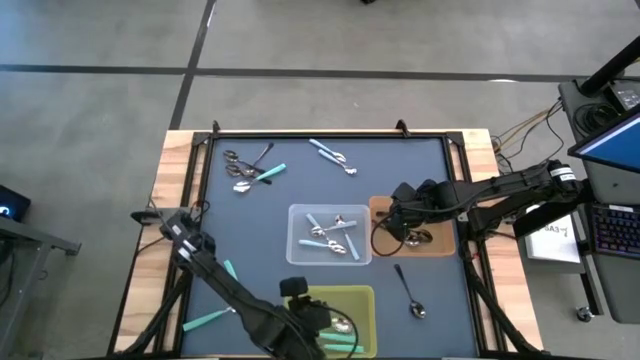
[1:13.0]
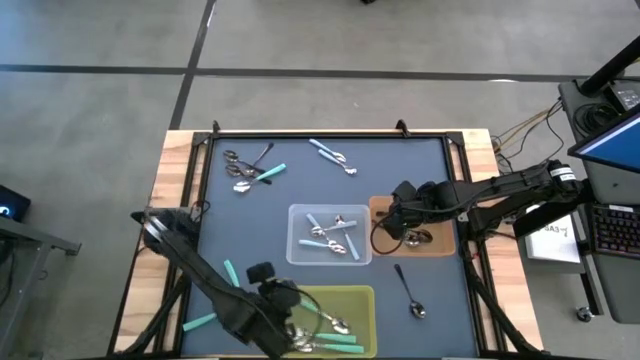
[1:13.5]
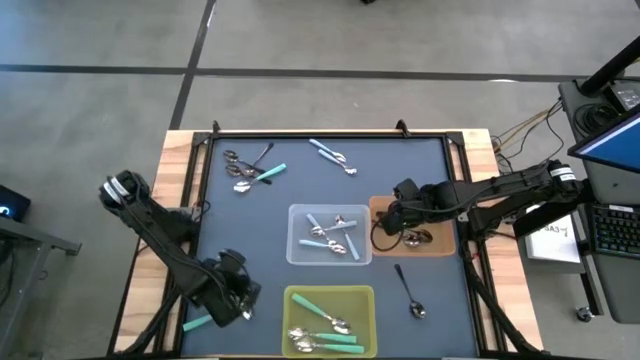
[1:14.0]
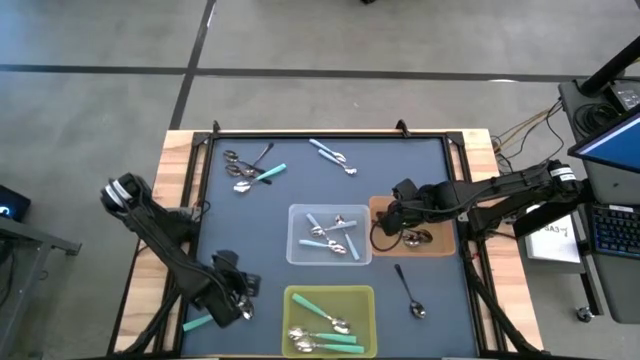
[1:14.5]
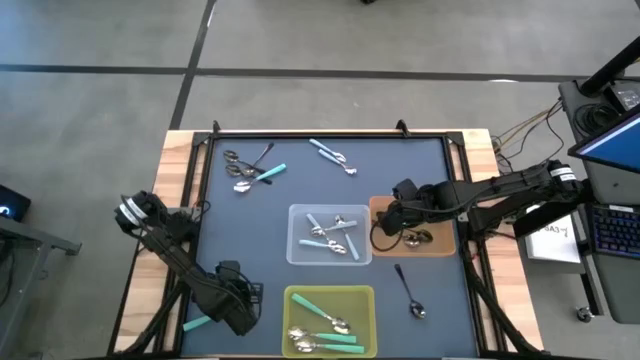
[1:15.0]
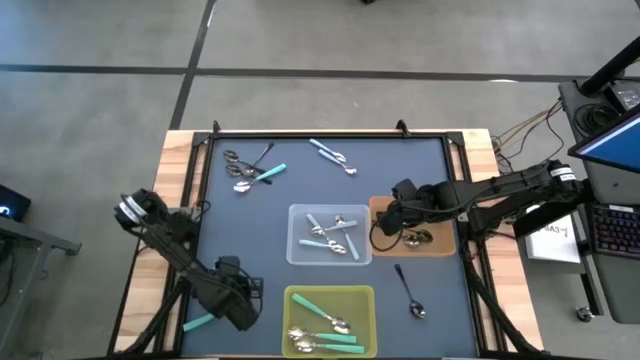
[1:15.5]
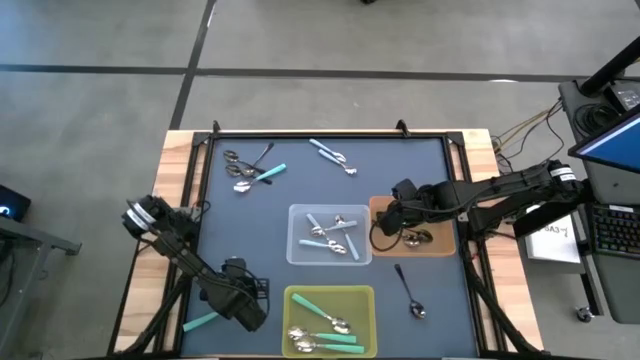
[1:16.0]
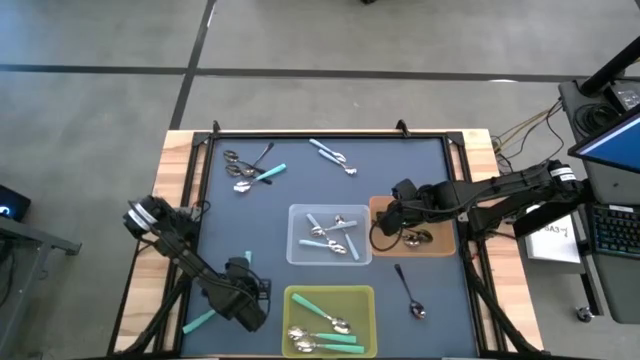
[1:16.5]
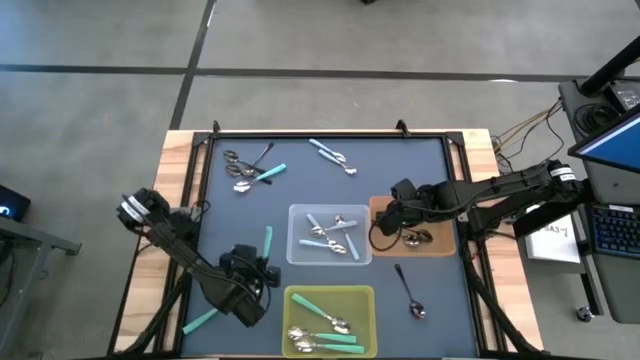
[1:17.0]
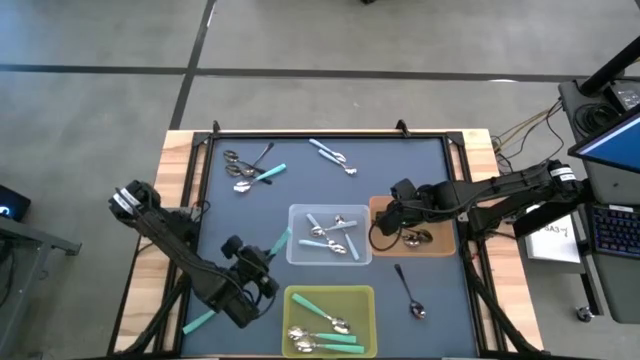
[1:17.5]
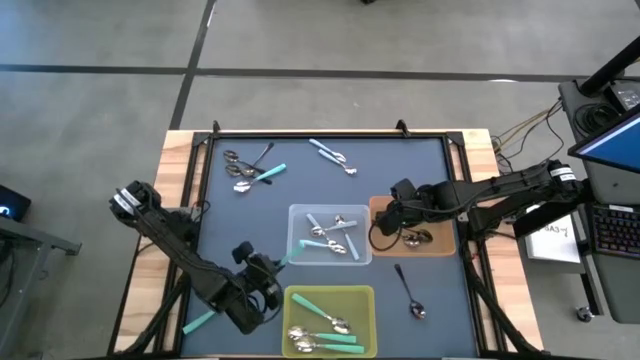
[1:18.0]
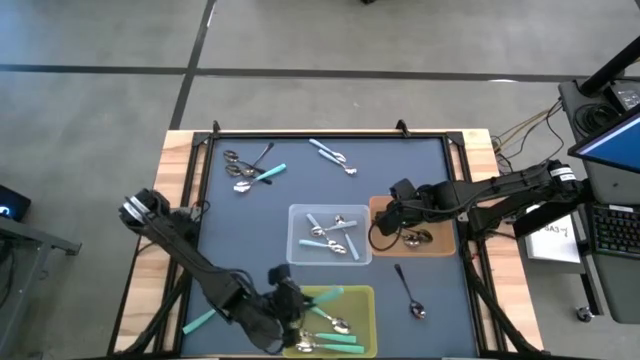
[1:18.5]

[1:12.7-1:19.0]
Task: Sort silverware by color (type)
Put the light green spoon into the yellow bin

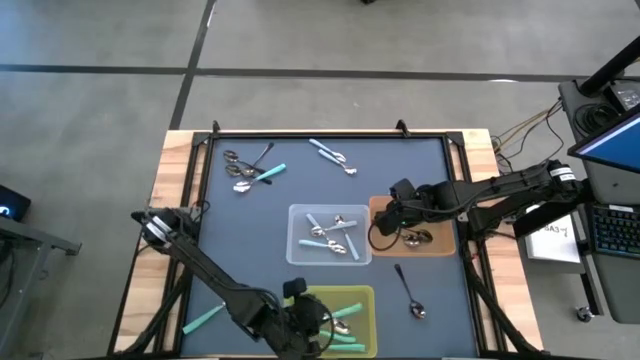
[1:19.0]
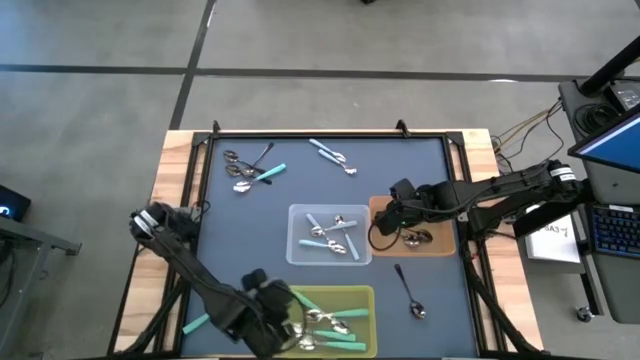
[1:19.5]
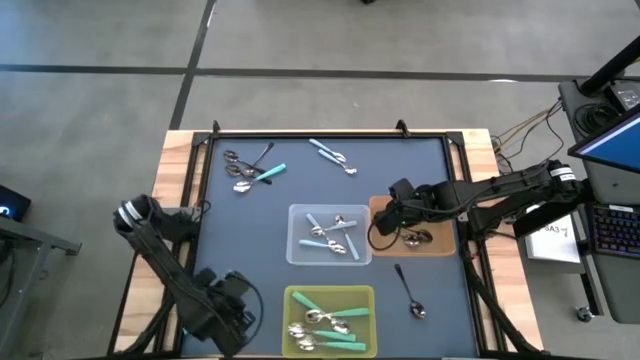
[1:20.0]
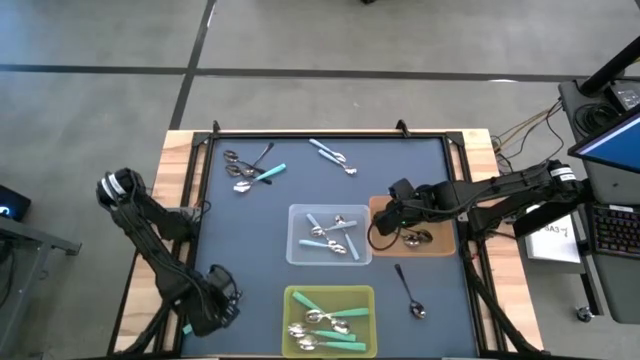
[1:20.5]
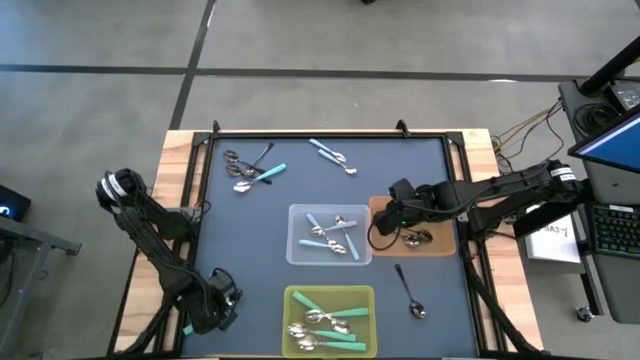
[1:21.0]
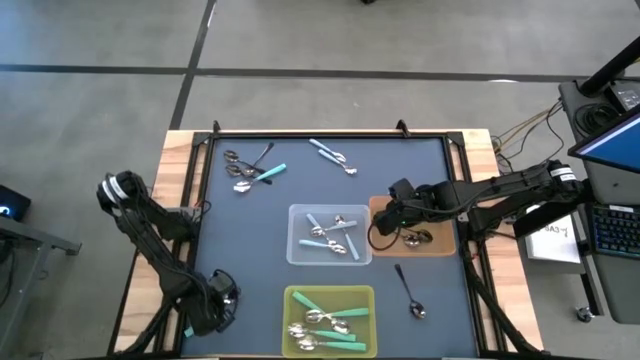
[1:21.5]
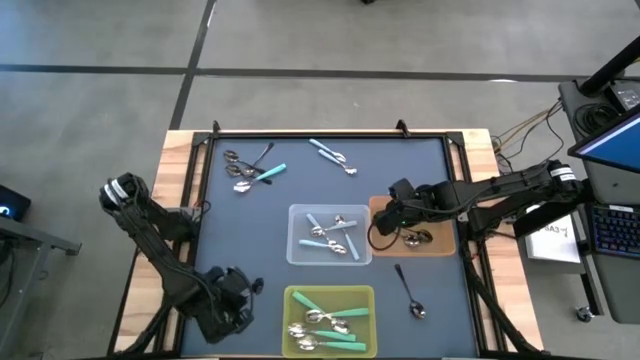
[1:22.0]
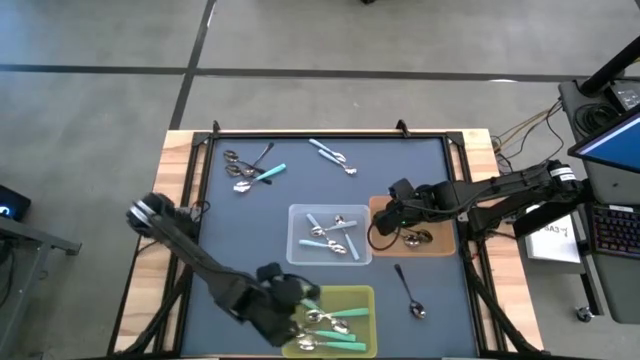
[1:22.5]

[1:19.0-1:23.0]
Put the light green spoon into the yellow bin

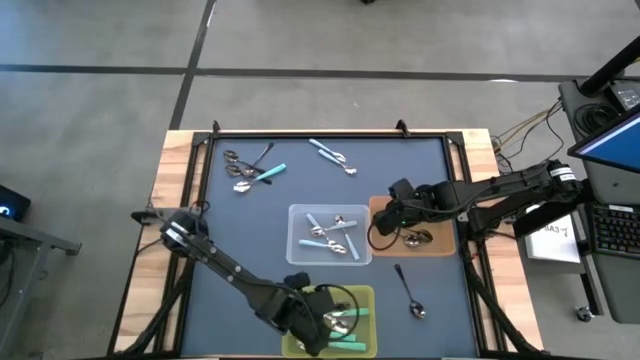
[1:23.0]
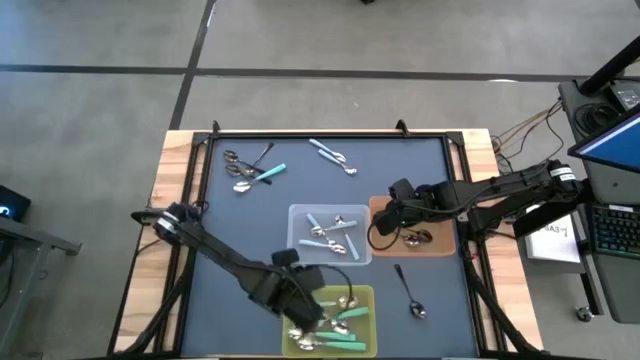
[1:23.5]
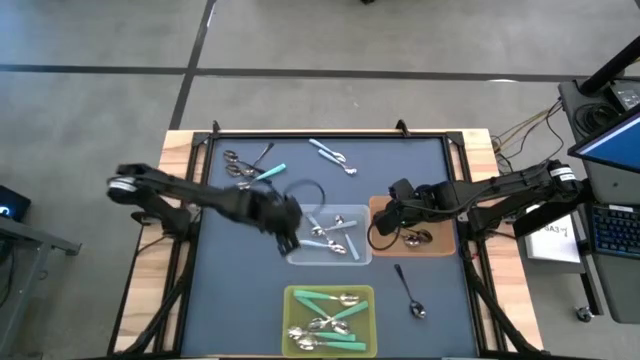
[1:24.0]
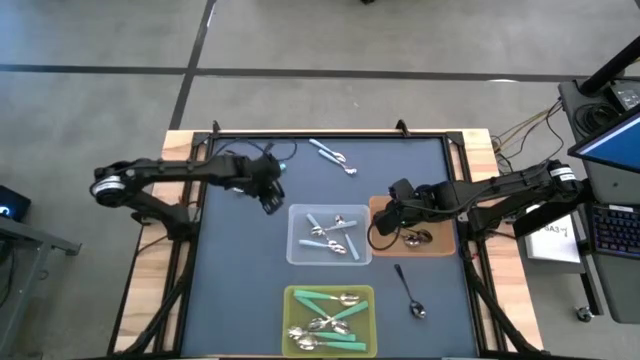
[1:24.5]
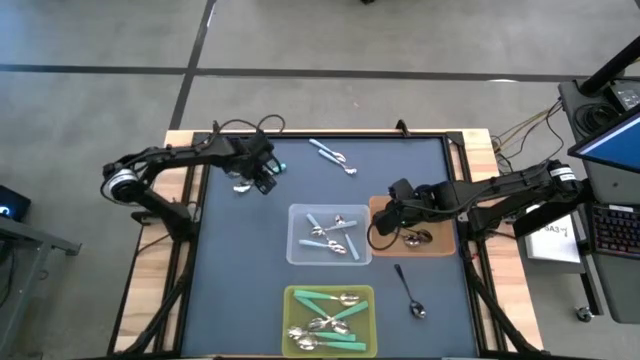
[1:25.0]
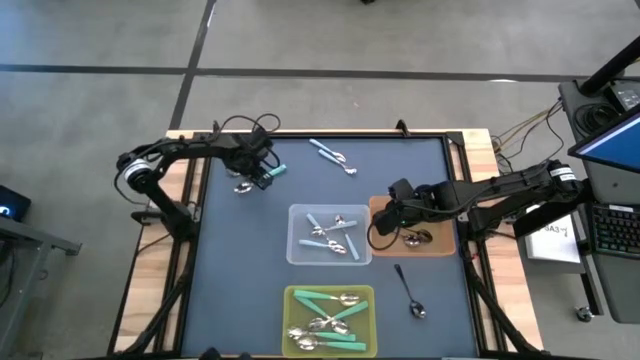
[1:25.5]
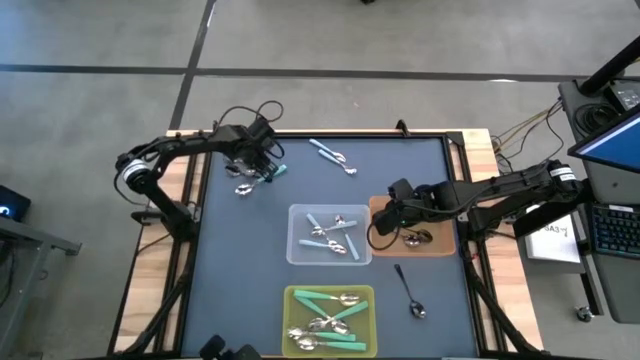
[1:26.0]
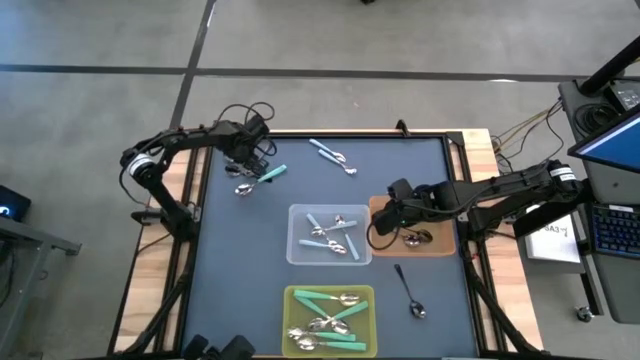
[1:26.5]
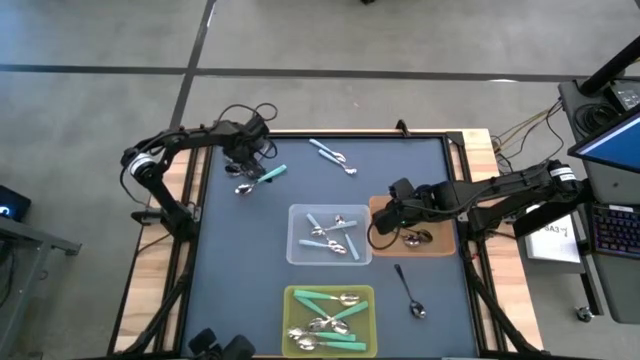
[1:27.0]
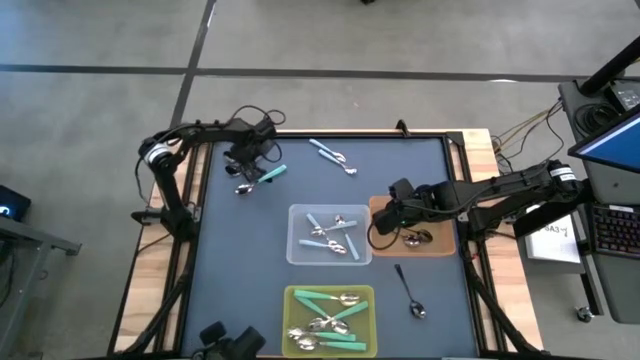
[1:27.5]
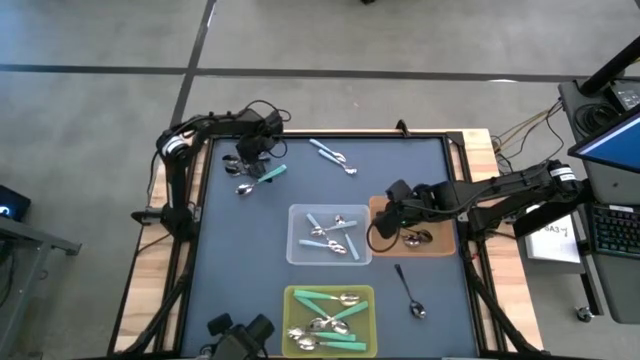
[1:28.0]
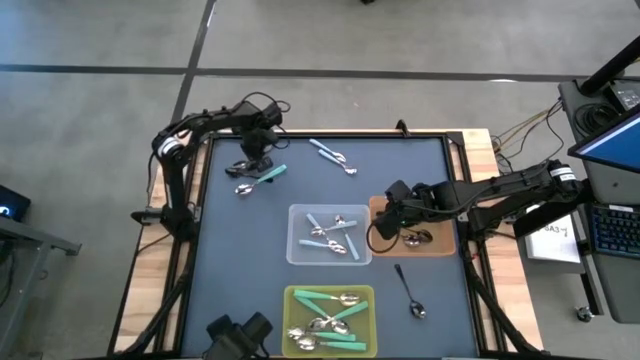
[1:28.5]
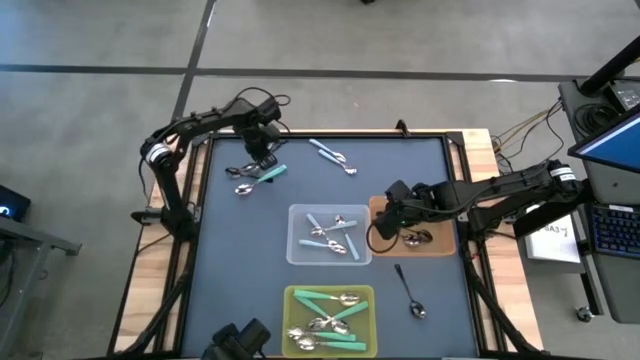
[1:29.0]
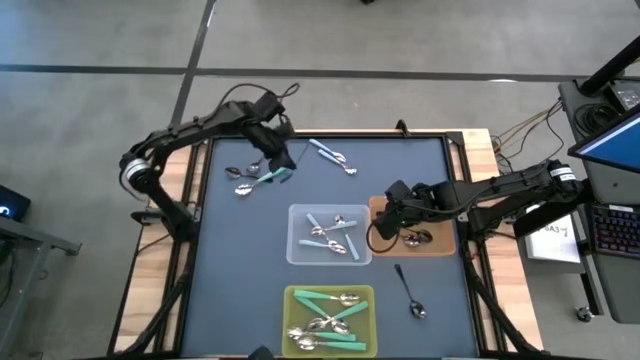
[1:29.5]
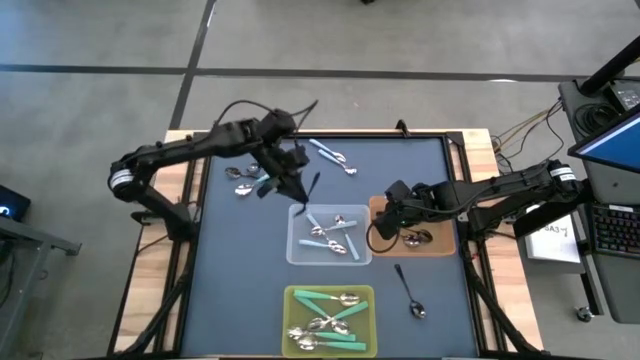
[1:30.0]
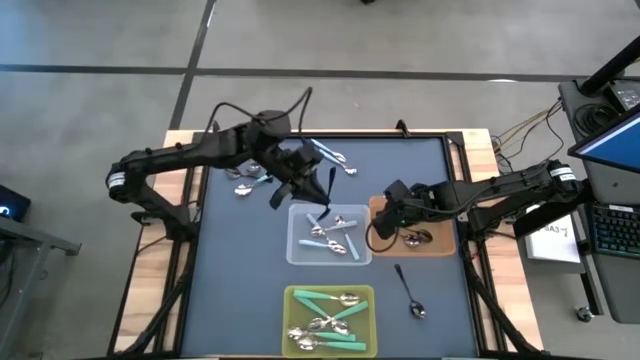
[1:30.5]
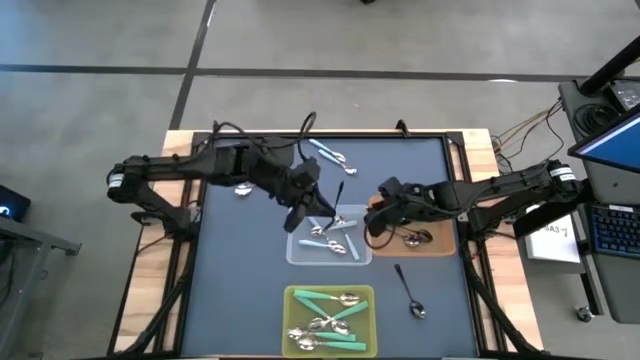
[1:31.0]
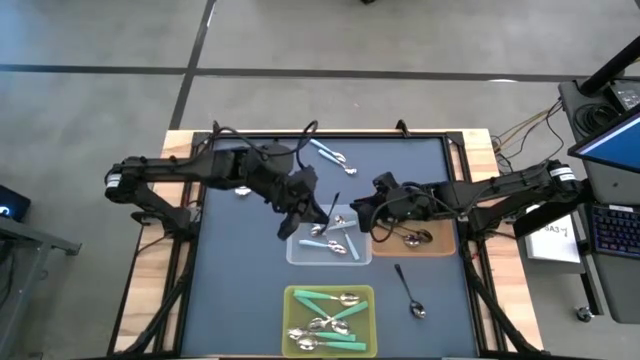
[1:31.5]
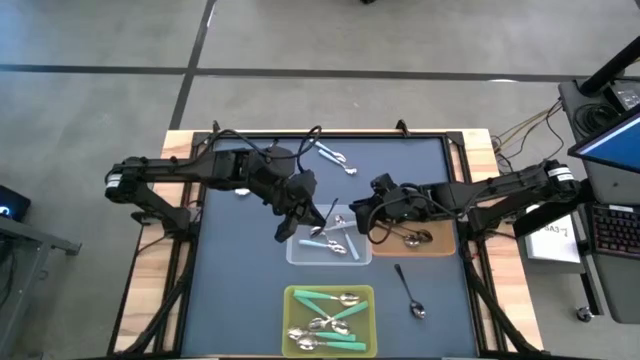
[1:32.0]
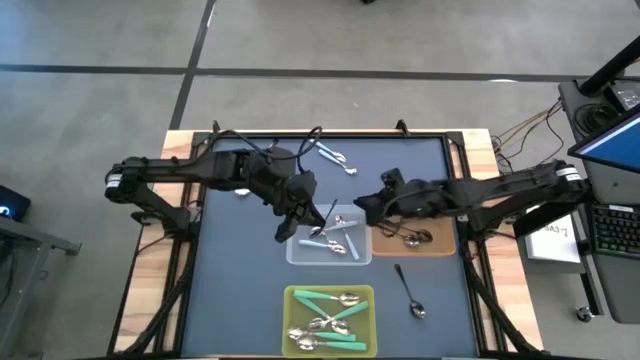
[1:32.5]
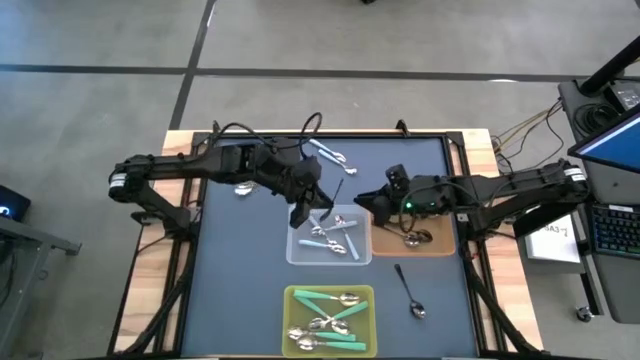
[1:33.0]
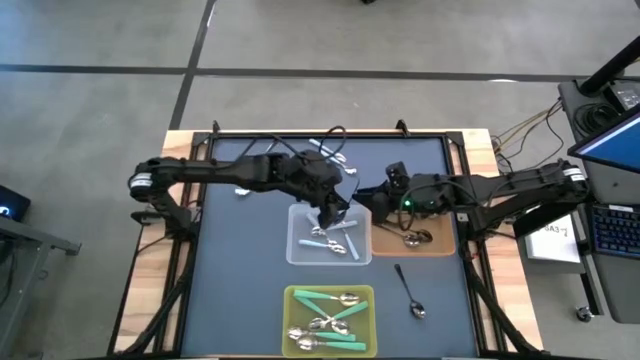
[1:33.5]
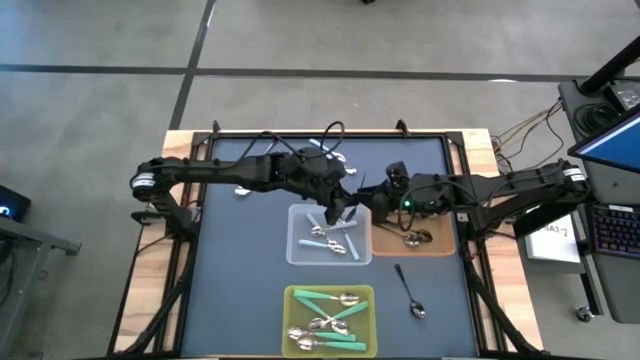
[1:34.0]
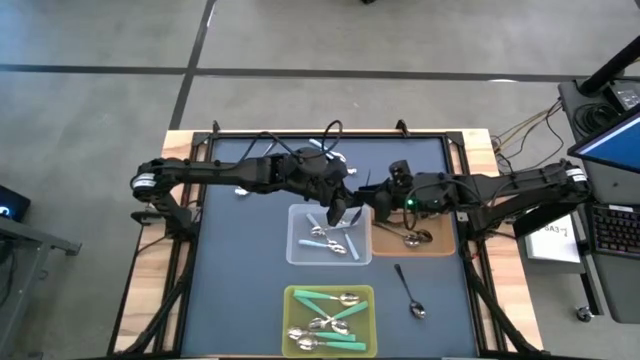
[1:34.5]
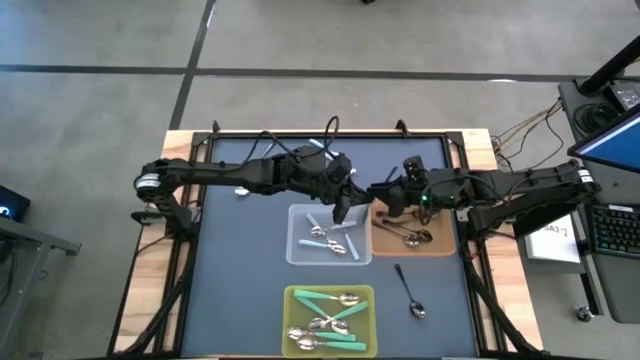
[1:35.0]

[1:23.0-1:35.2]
Put the black spoon into the orange bin
